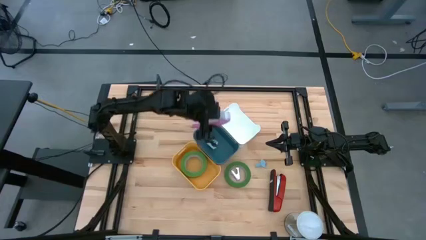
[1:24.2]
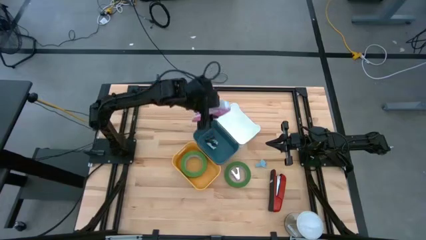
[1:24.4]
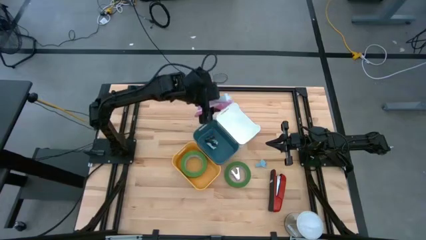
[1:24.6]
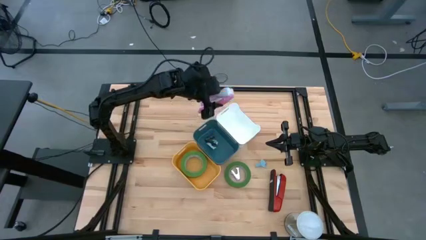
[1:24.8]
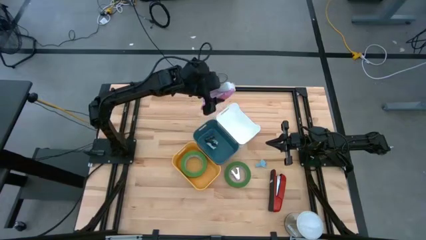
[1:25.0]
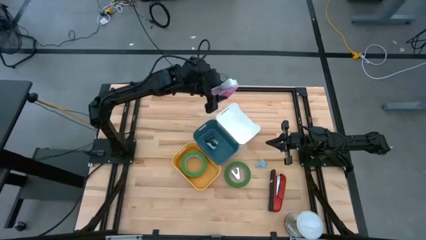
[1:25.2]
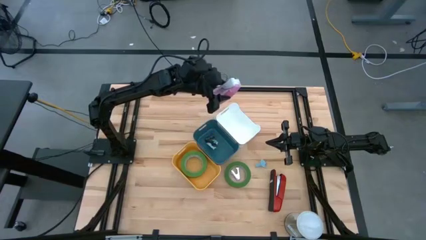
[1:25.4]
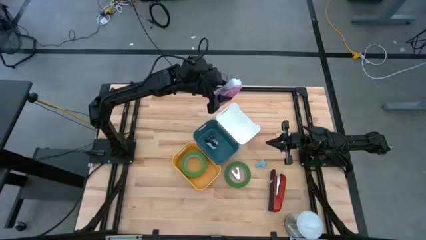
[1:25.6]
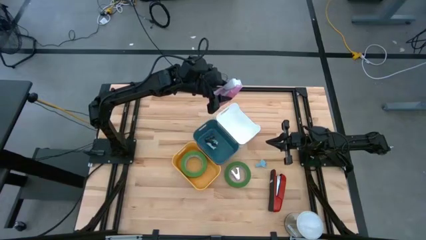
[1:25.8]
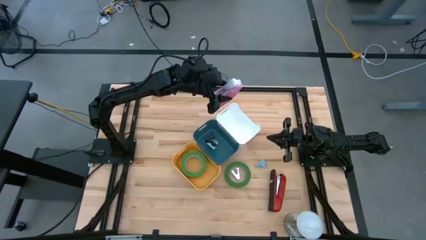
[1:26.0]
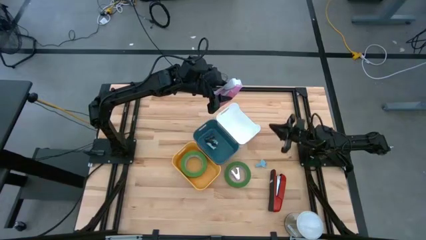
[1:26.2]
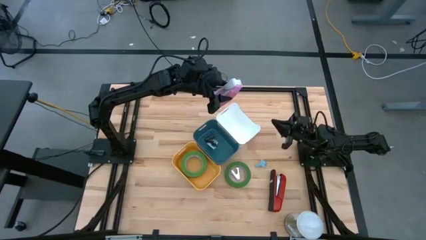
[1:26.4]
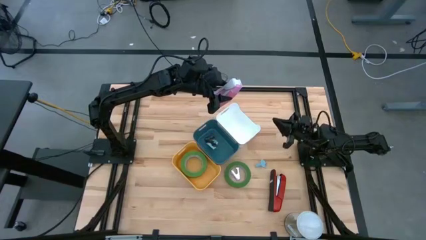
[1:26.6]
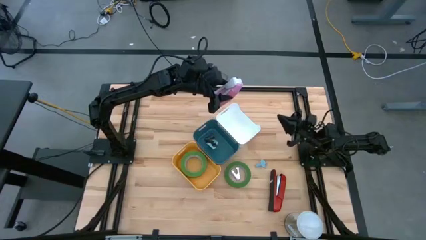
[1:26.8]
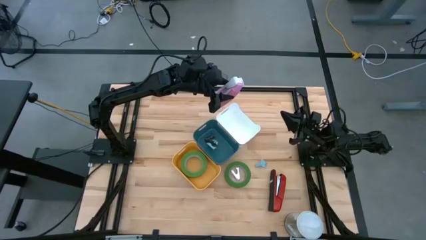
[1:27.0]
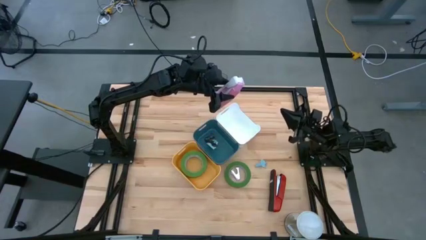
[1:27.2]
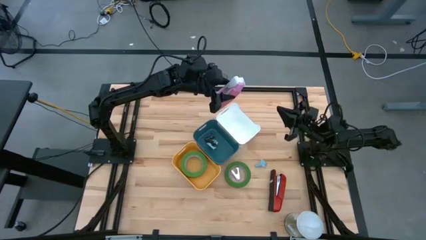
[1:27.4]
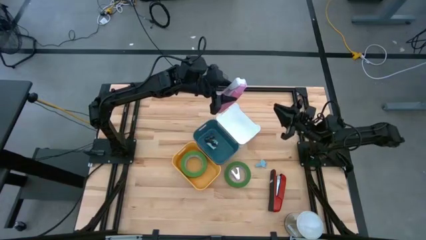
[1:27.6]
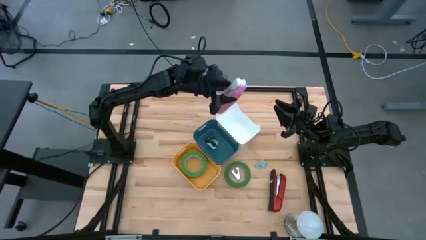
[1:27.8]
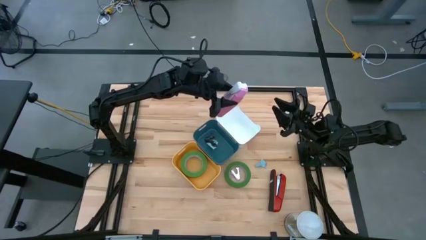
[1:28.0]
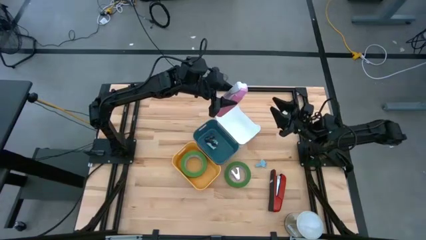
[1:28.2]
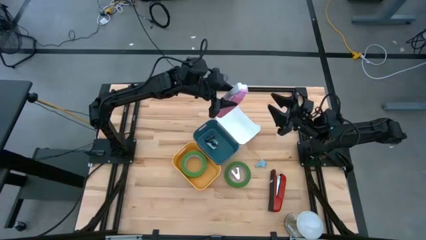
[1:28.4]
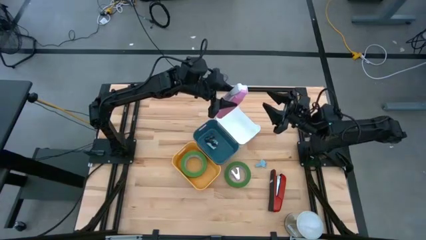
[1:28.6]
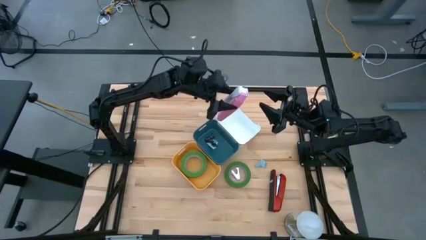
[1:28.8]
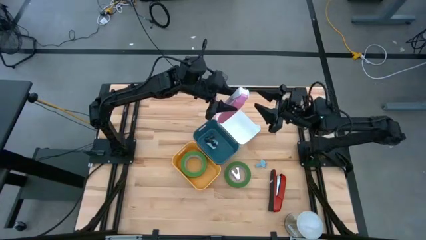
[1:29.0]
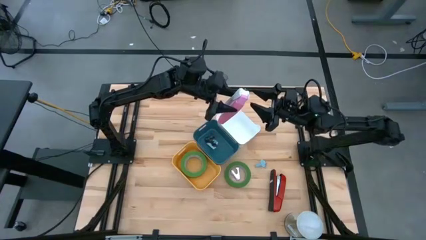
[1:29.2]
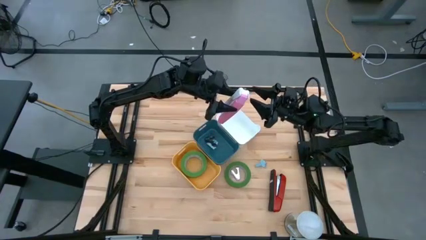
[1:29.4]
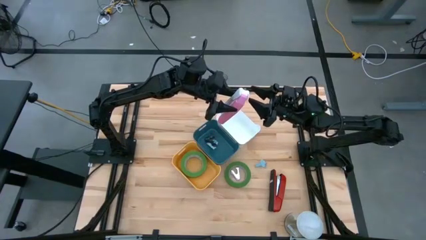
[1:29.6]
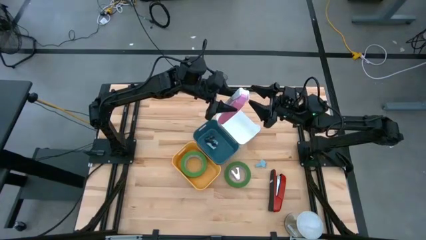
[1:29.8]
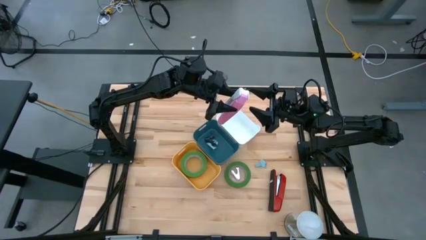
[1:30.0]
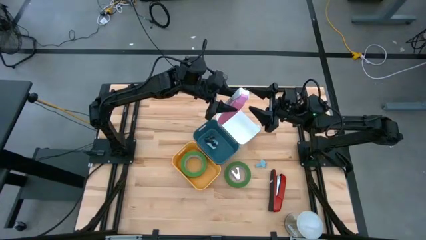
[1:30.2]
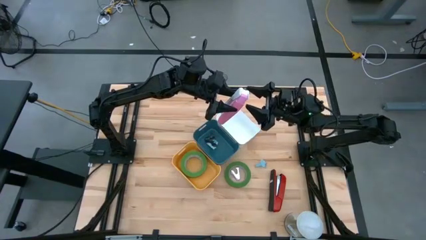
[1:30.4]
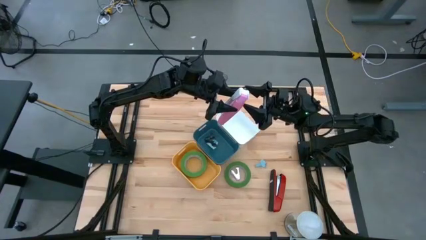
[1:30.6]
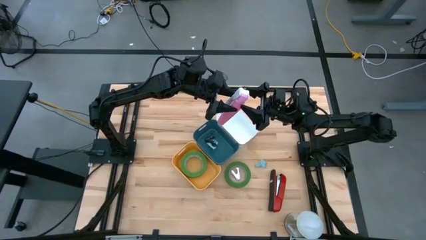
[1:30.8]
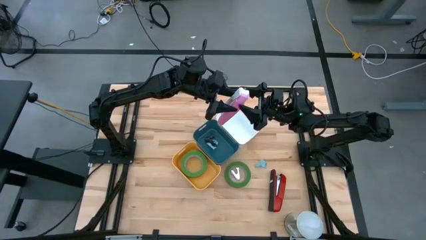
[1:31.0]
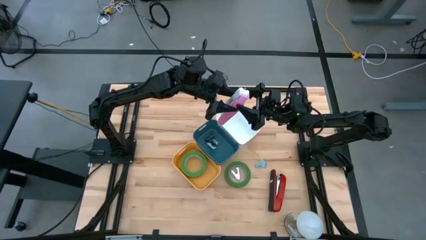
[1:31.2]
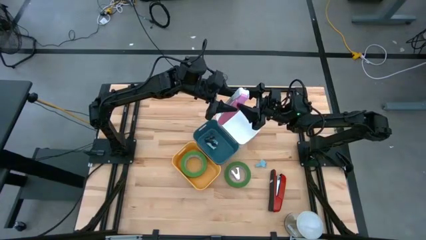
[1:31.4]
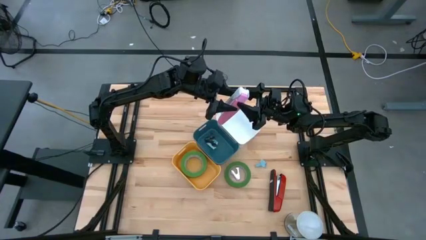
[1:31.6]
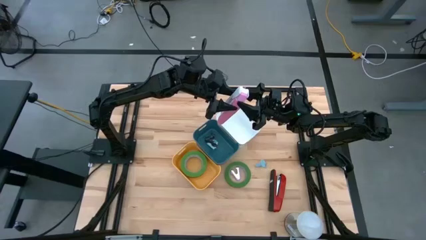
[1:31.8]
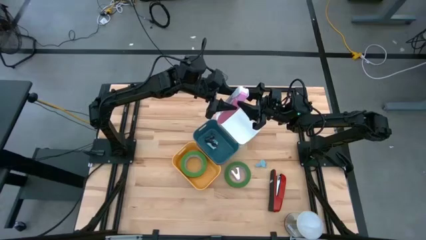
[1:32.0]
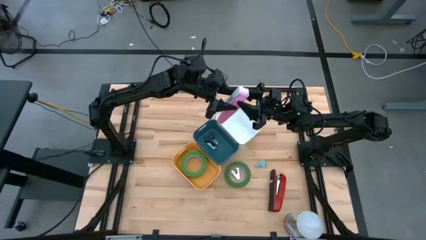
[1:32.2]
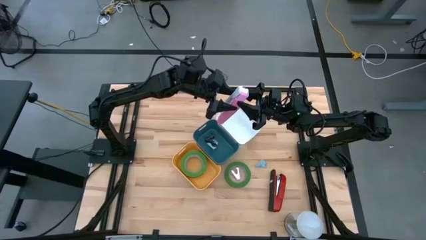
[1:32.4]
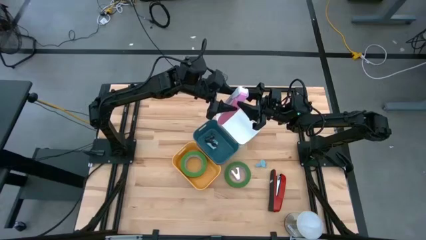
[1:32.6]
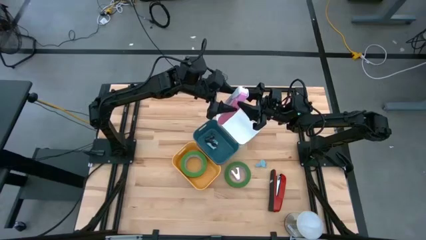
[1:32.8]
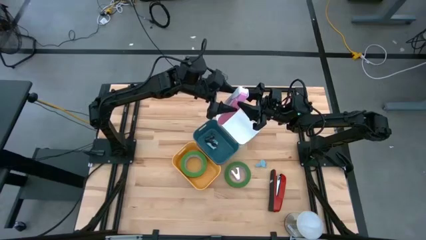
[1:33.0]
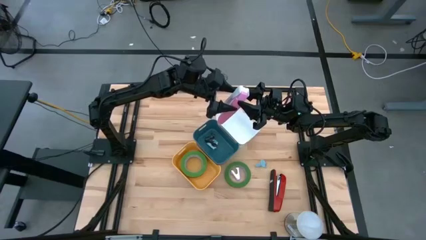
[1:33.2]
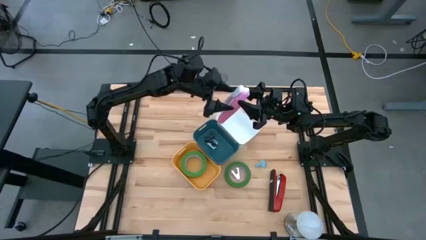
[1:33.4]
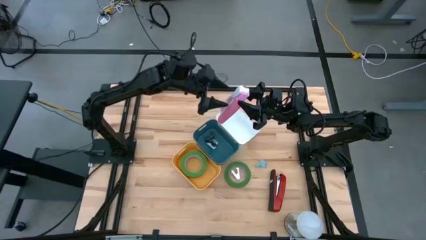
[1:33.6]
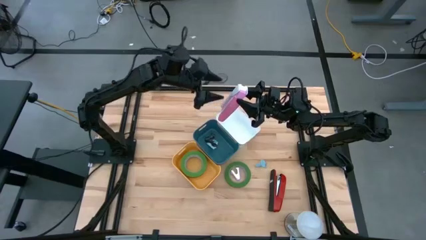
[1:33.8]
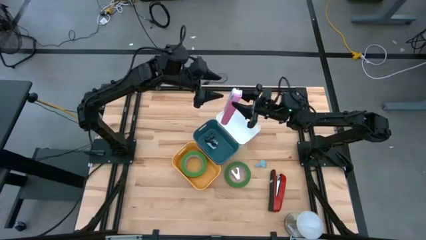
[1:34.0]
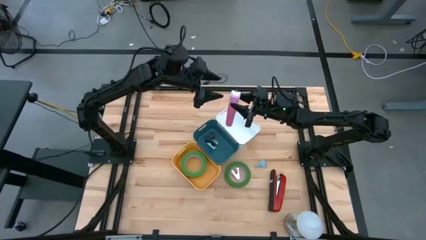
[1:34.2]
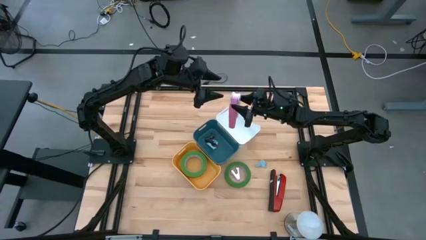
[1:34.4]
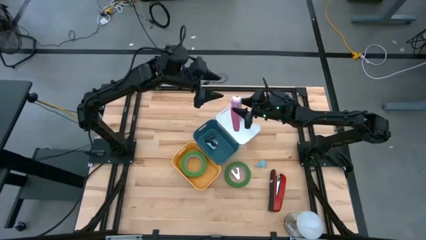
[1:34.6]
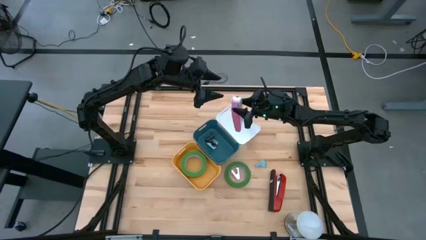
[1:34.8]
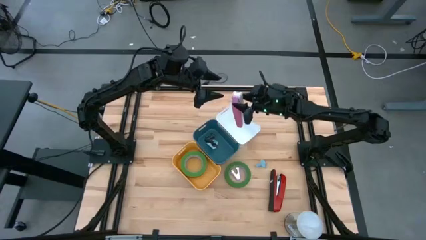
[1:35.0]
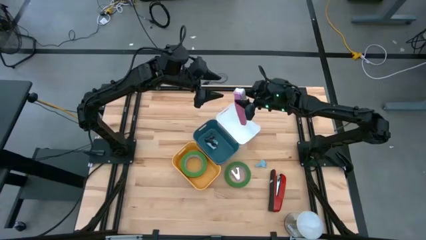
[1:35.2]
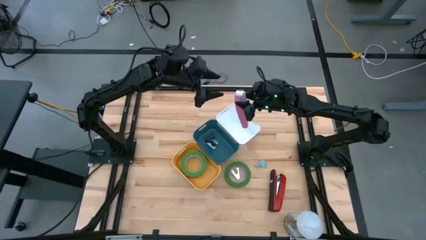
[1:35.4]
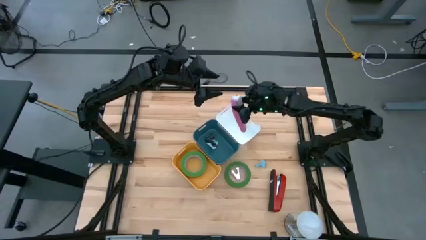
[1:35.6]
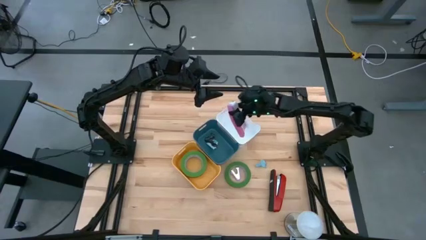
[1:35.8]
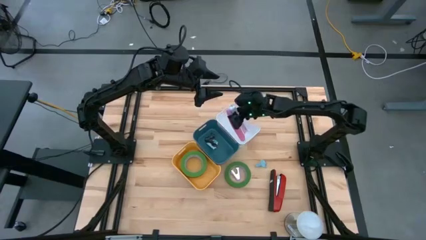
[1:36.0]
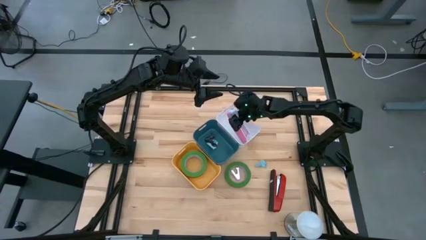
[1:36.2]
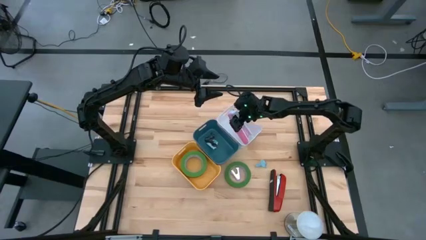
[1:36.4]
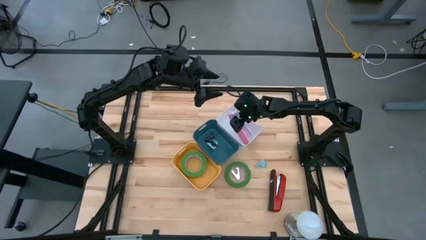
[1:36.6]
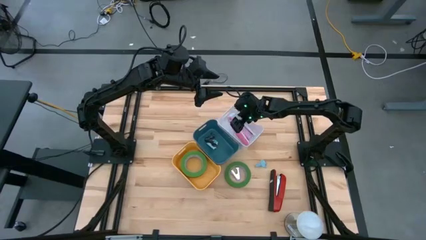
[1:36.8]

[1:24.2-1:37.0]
Task: Pick and place Stapler, Stapler remover, tape
Put the pink stapler into the white bin

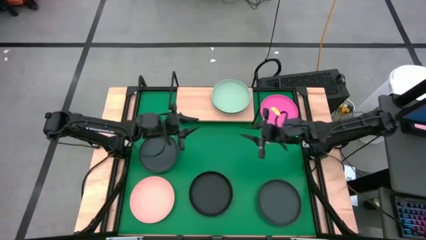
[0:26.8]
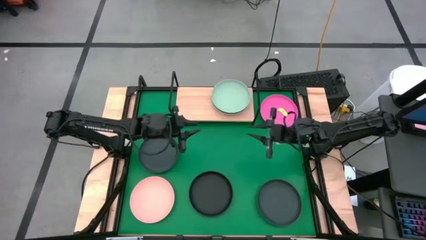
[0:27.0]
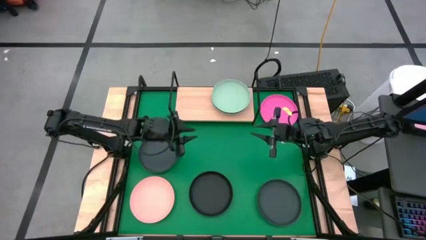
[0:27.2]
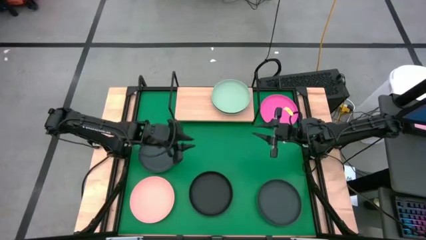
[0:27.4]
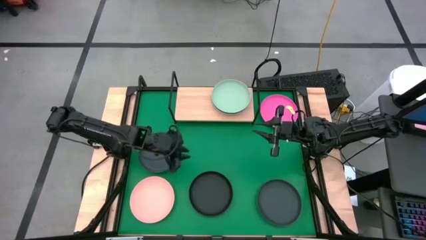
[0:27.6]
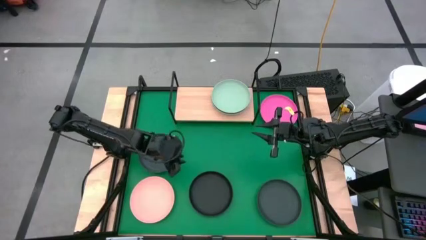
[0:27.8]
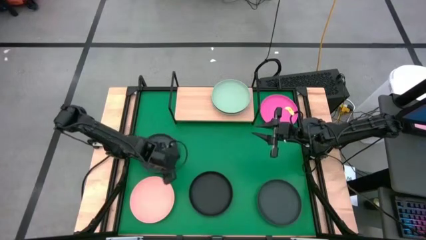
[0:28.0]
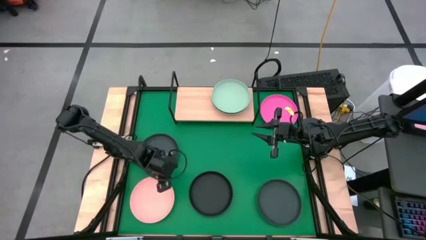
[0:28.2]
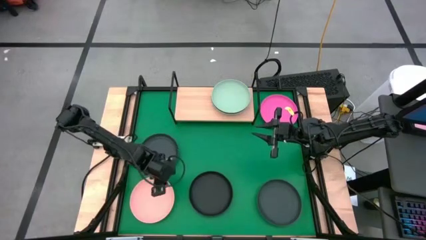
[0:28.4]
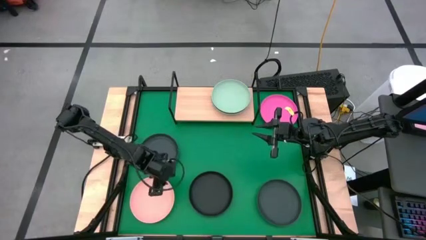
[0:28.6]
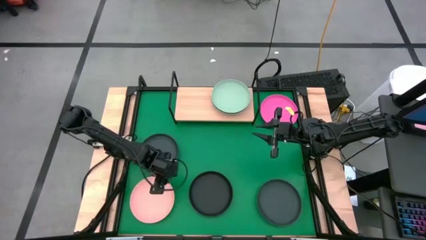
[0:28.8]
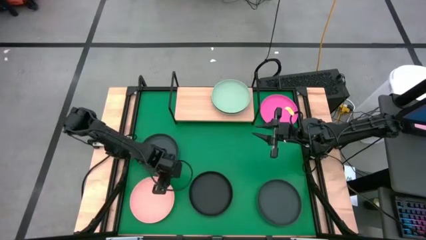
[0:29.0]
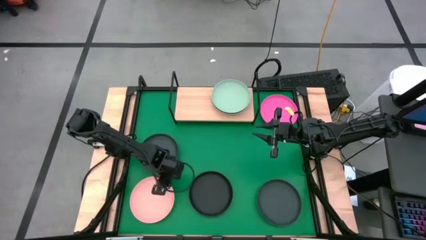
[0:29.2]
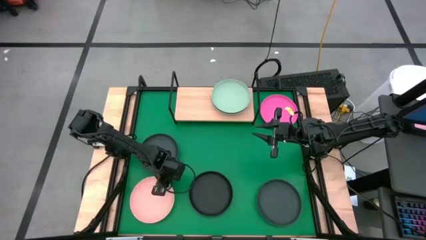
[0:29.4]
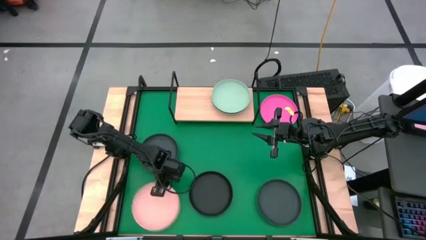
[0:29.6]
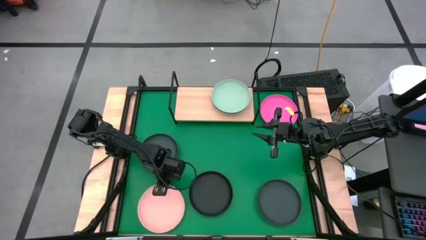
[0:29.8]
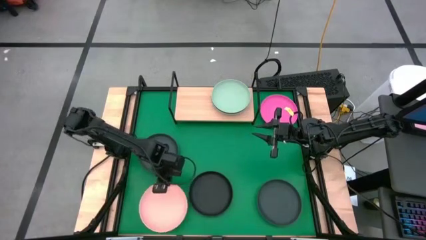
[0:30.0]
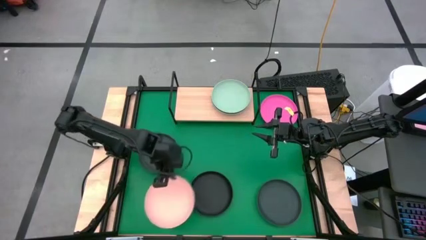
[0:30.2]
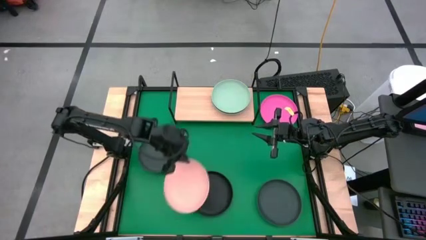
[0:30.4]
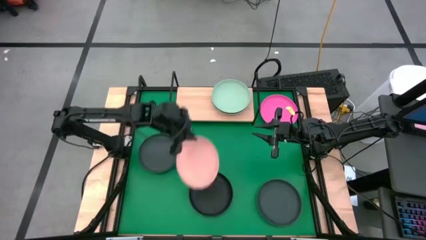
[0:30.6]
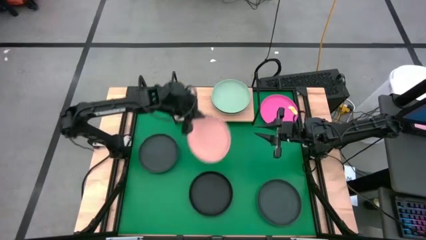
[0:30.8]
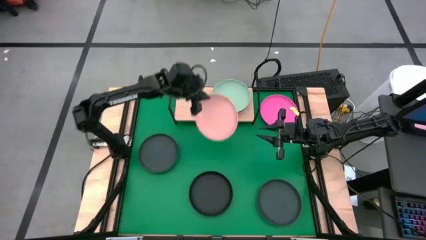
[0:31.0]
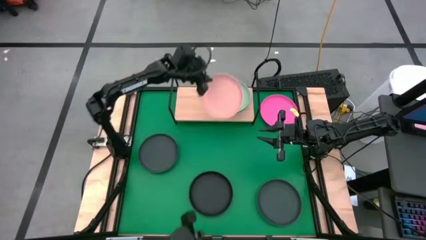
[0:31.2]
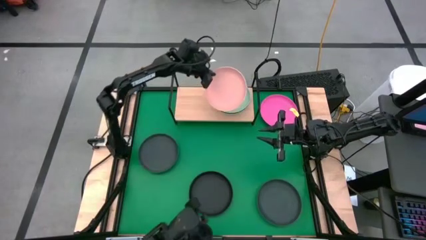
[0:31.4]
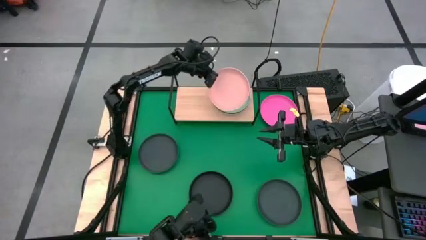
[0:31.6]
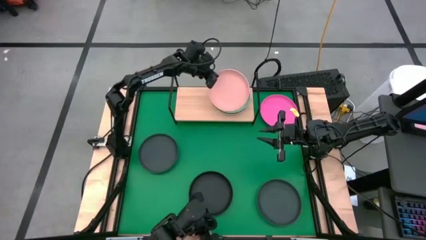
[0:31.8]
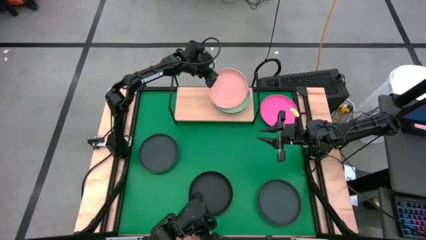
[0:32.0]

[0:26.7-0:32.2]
Task: Place and stack plates onto a shelf
Stack the light pink plate on top of the light green plate
